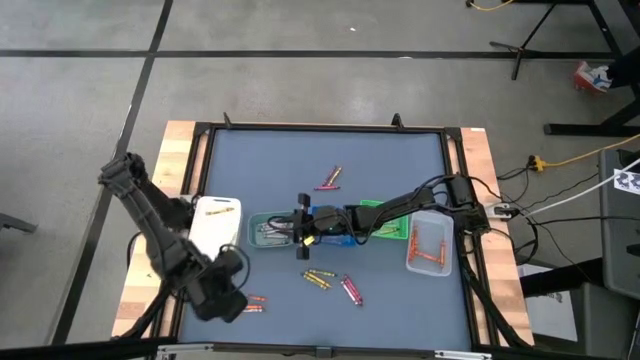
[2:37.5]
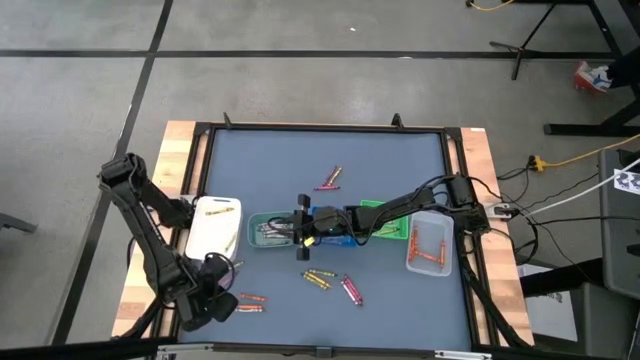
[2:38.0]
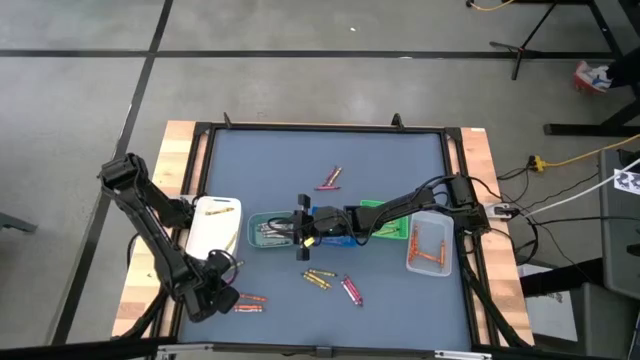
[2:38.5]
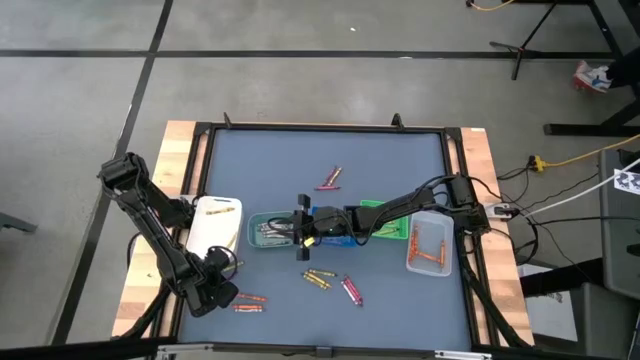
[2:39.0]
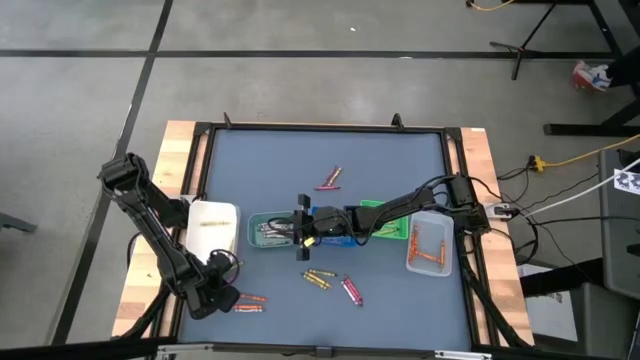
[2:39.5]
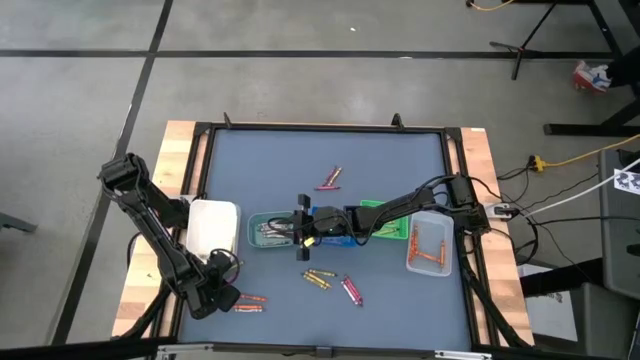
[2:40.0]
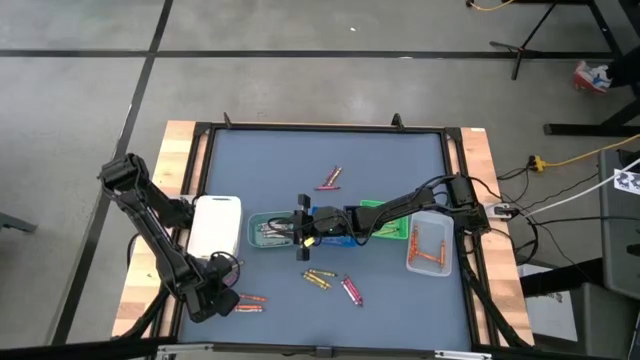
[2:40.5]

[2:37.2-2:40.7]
Task: Sort crayons
Put the red crayon into the blue bin

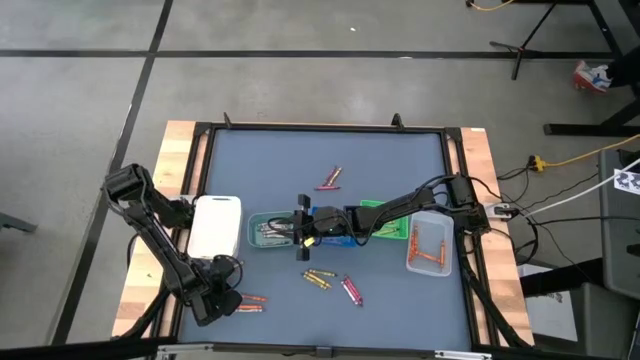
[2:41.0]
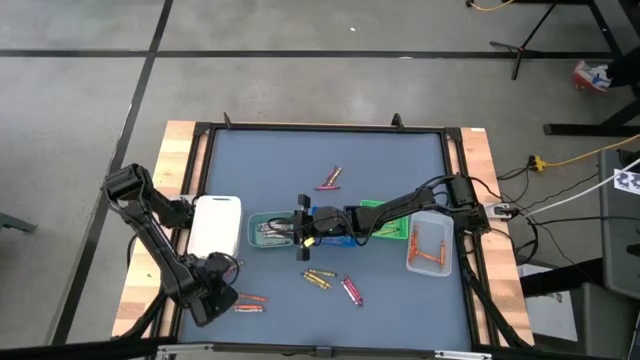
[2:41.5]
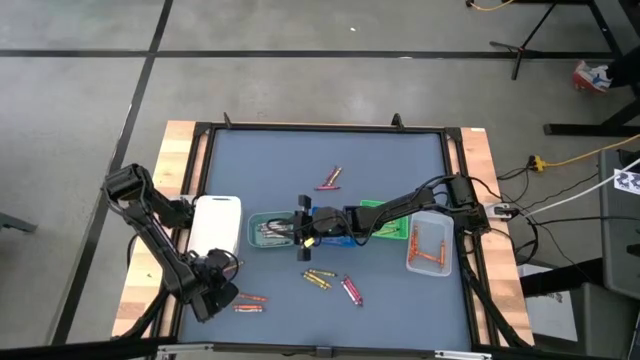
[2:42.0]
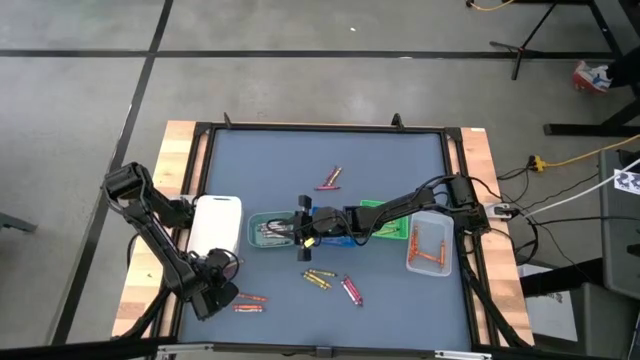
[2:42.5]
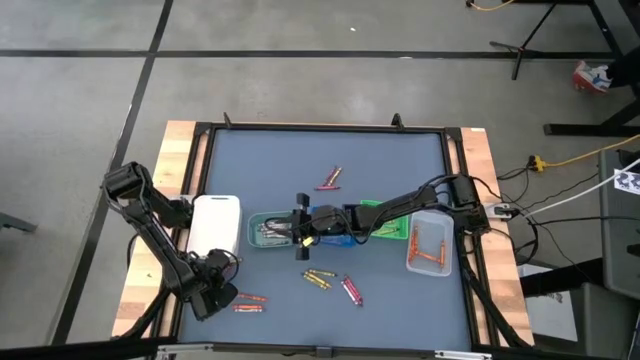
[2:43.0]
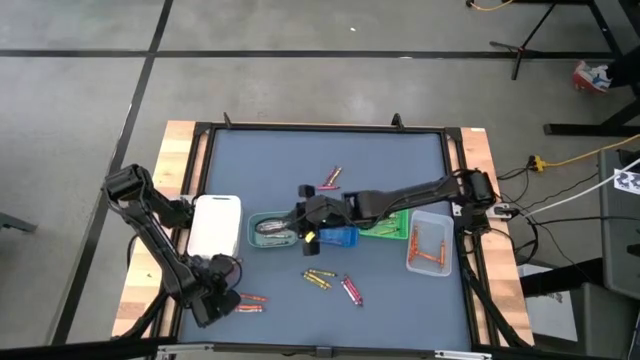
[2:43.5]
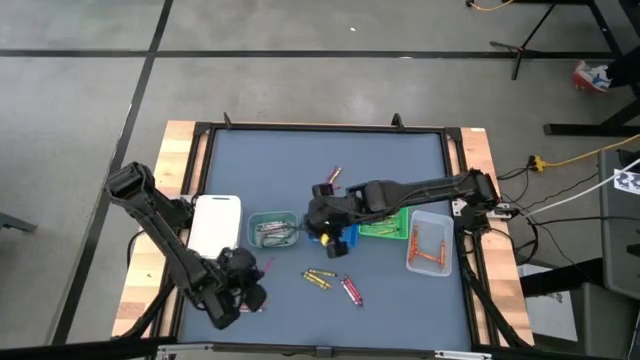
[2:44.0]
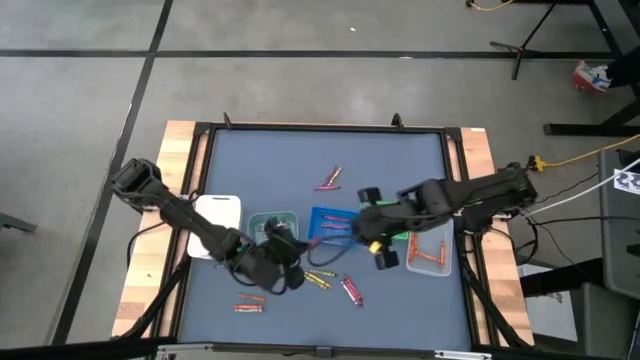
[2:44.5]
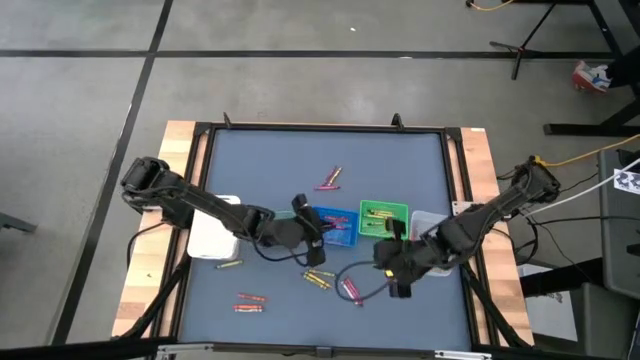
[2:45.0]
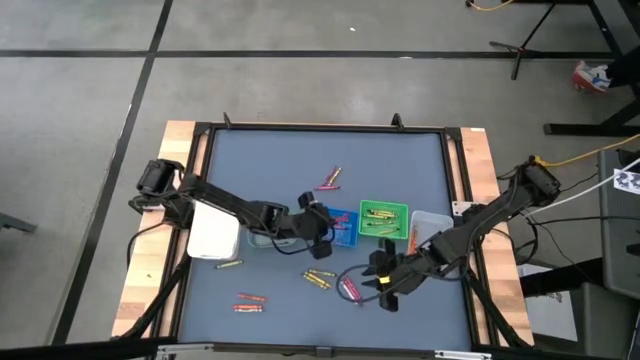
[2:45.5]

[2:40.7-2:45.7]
Put the red crayon into the blue bin

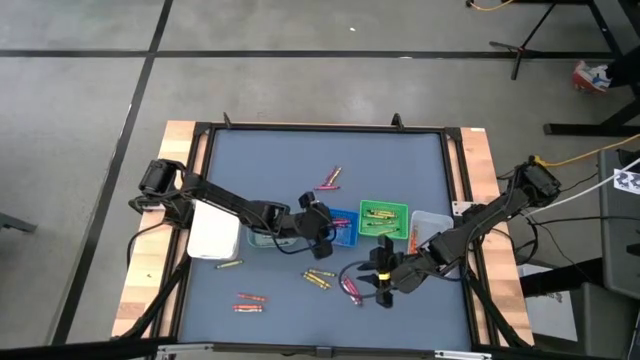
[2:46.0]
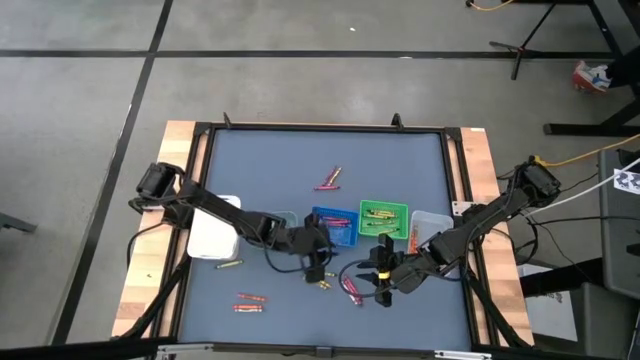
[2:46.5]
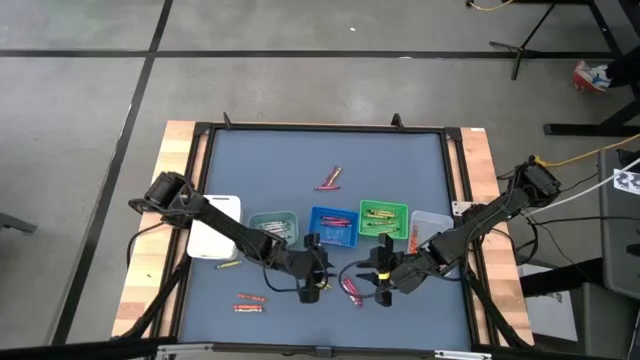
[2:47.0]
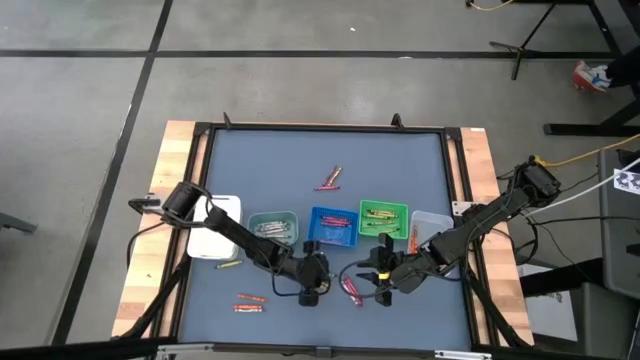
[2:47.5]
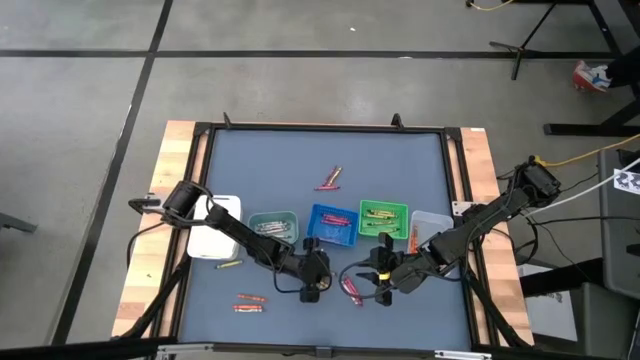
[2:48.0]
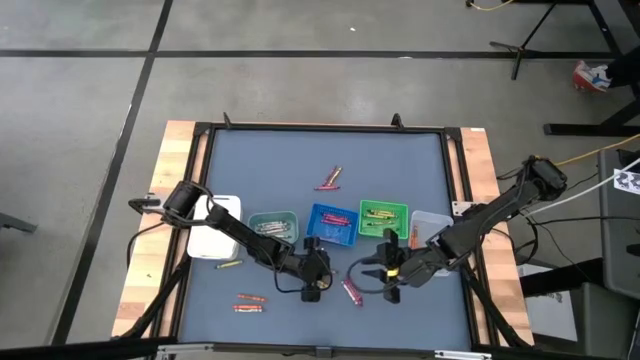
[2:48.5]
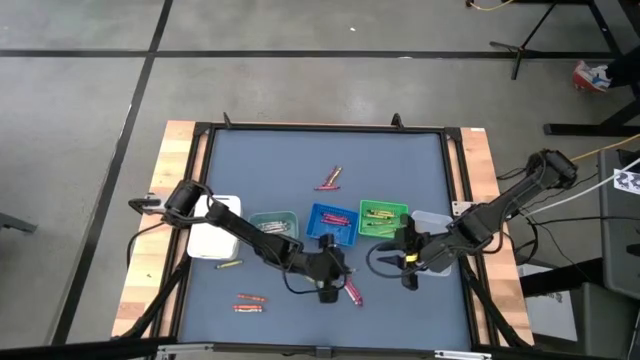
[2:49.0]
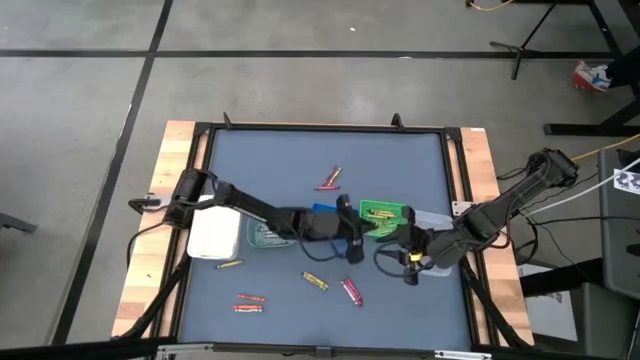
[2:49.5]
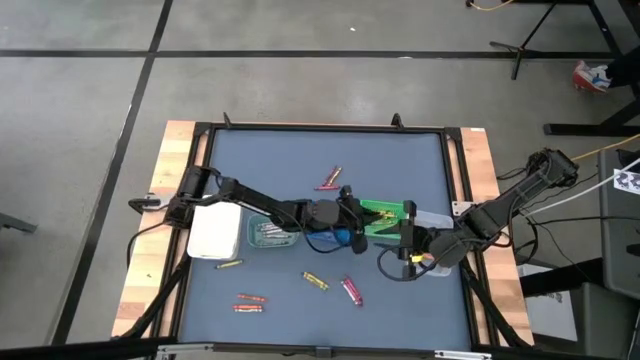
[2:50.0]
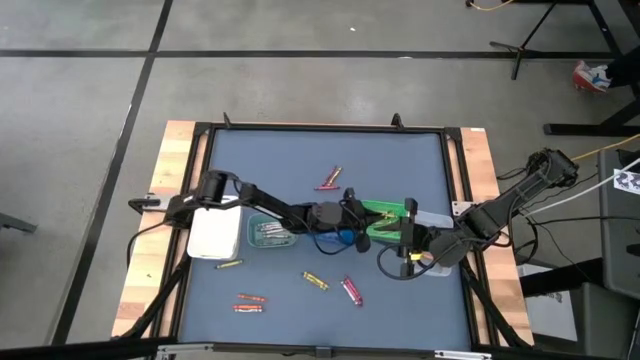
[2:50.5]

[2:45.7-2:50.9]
Put the green crayon into the green bin

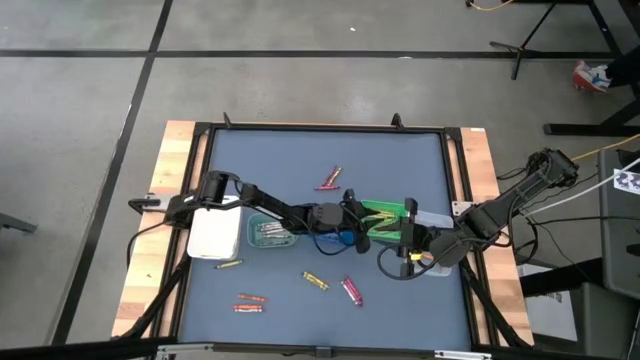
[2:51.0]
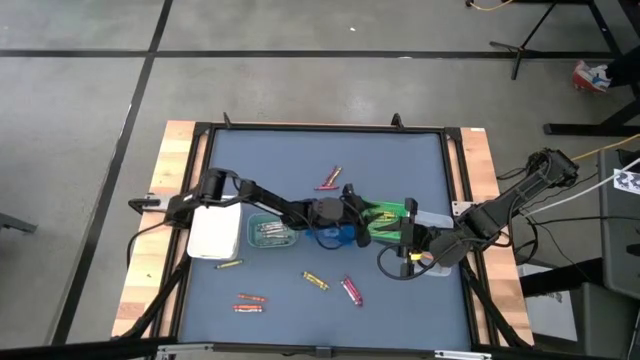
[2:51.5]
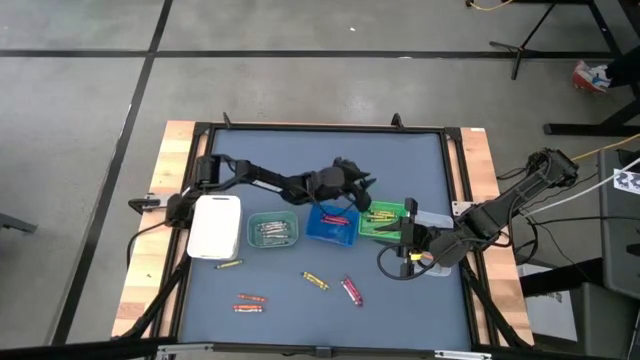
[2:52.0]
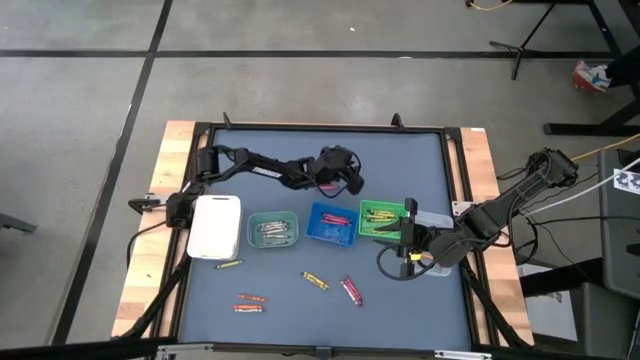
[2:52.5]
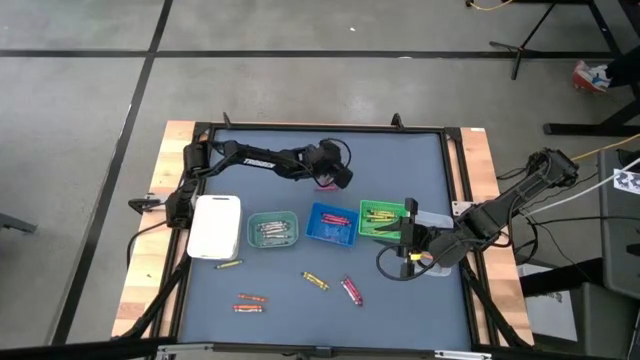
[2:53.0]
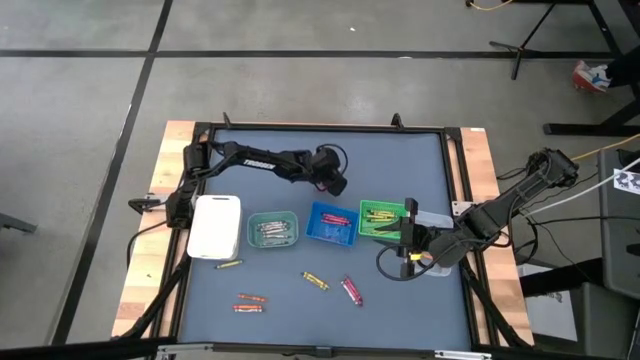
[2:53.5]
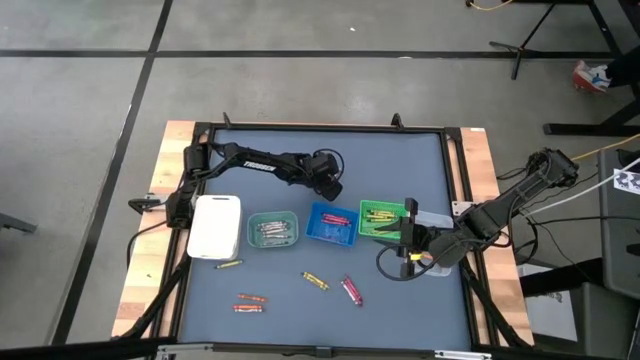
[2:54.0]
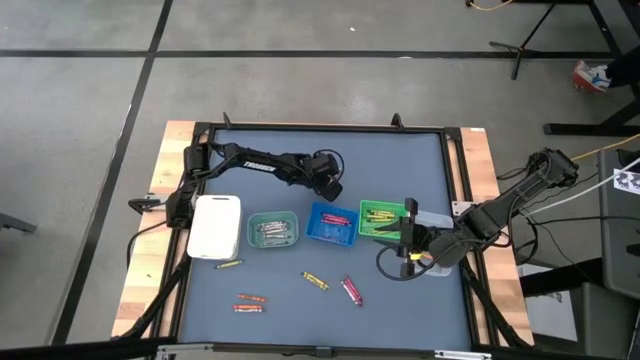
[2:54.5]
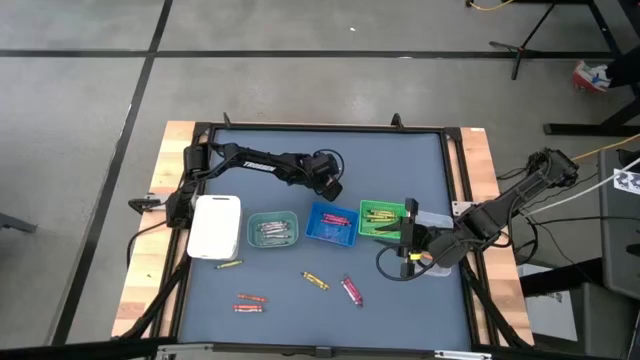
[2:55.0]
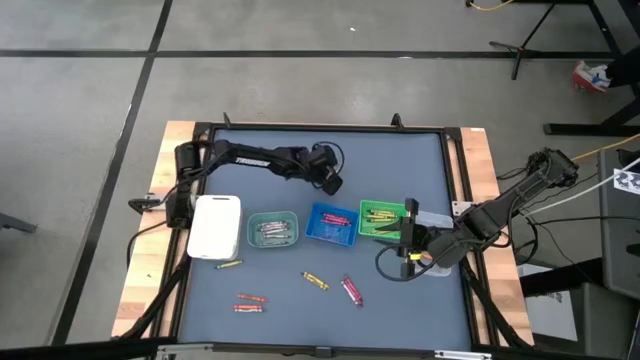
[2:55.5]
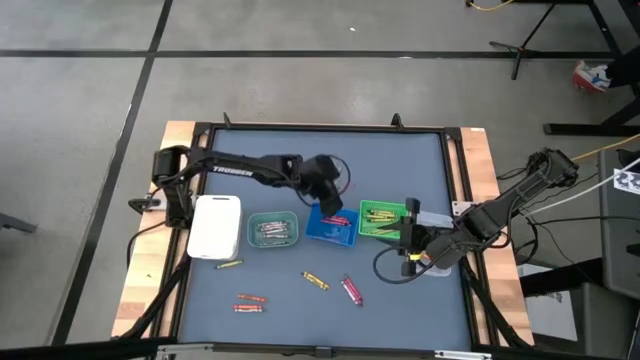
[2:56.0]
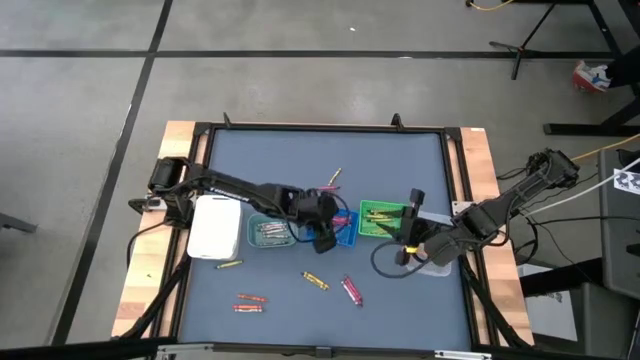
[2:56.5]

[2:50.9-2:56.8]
Put the red crayon into the blue bin

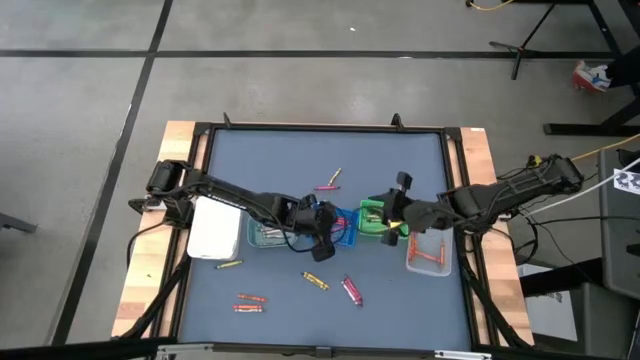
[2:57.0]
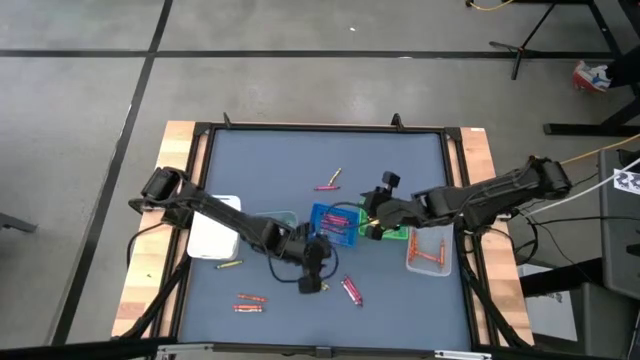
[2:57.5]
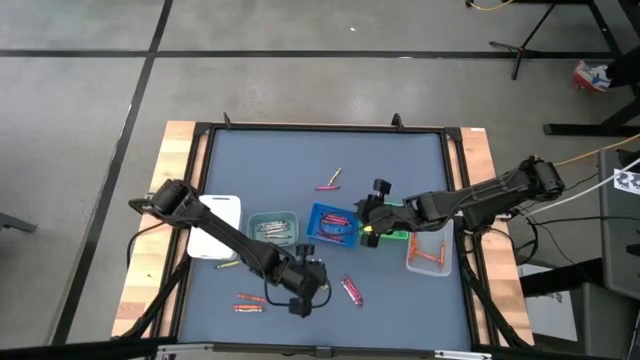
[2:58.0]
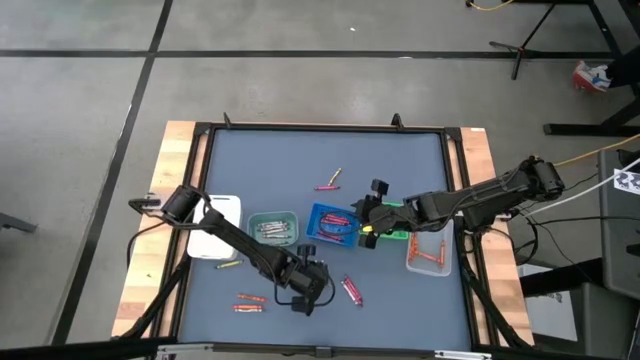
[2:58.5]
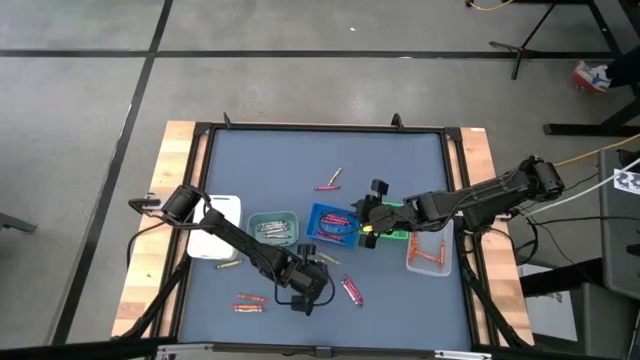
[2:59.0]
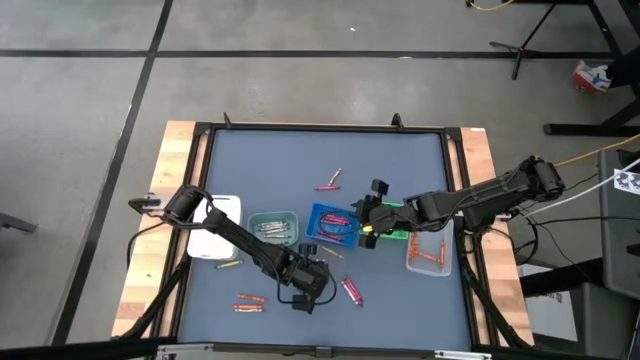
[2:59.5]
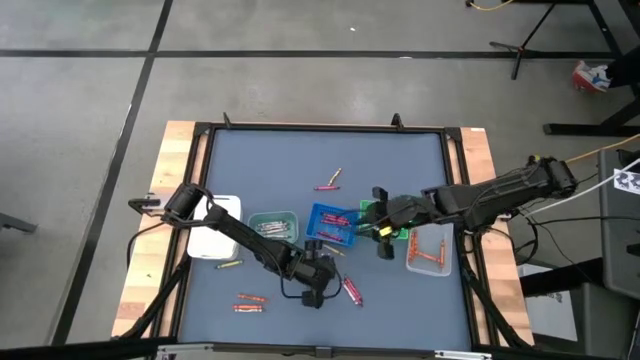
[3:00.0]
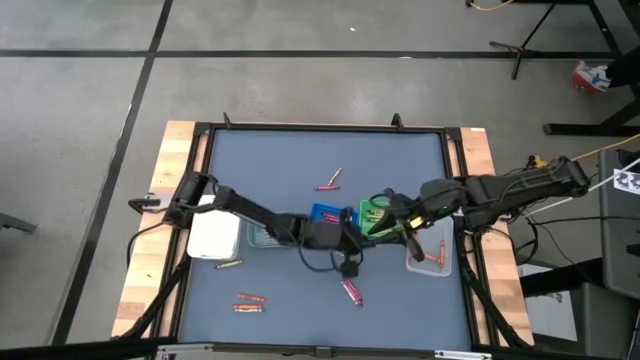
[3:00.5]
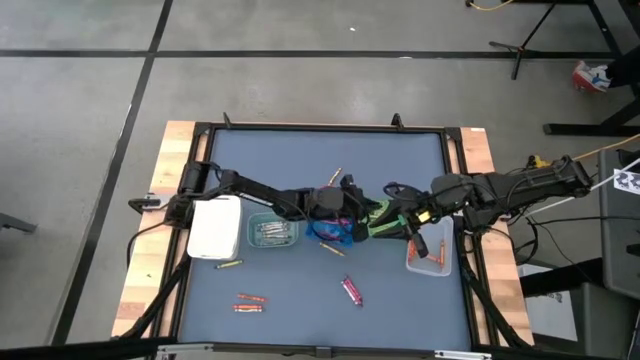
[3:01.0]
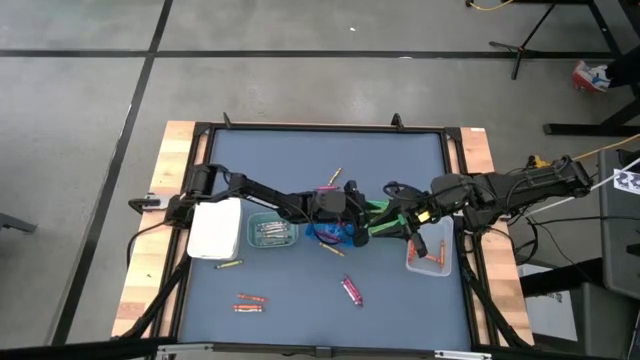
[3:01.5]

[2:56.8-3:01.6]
Put the green crayon into the green bin
